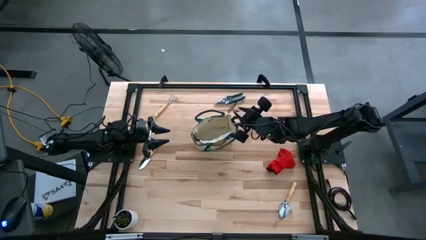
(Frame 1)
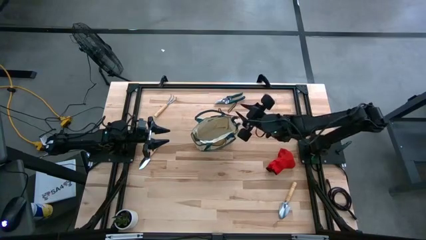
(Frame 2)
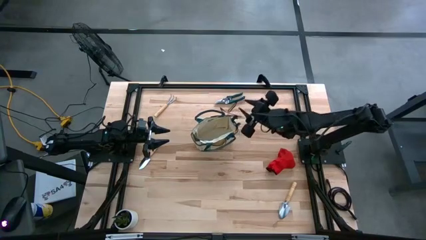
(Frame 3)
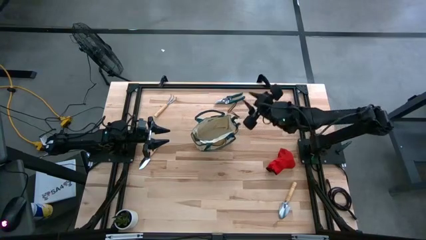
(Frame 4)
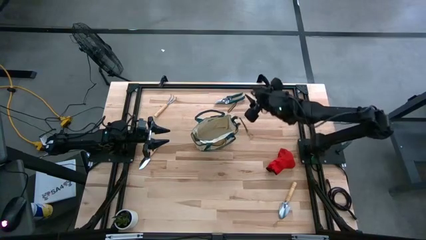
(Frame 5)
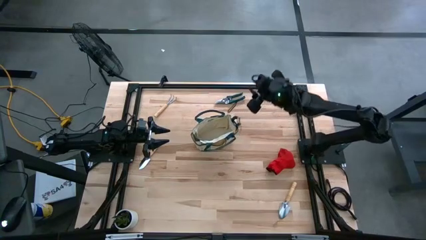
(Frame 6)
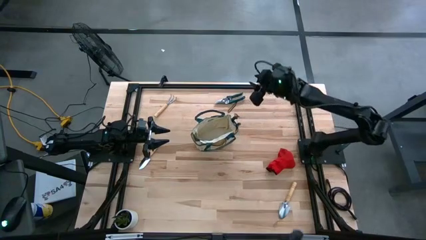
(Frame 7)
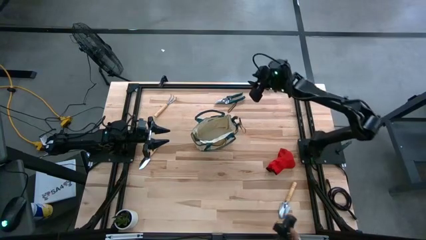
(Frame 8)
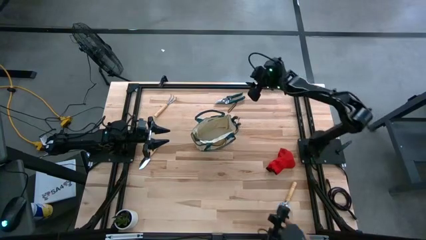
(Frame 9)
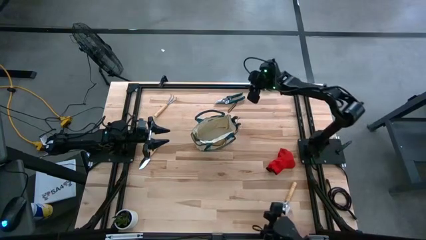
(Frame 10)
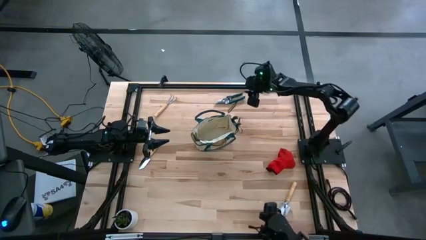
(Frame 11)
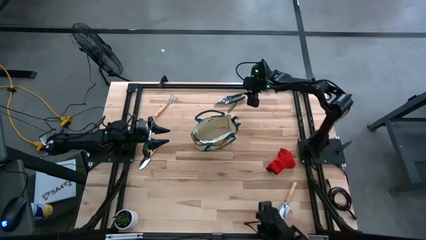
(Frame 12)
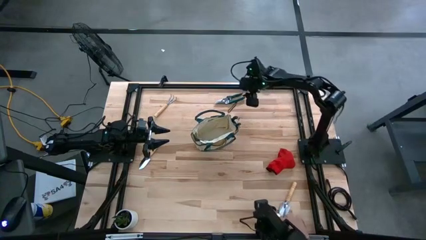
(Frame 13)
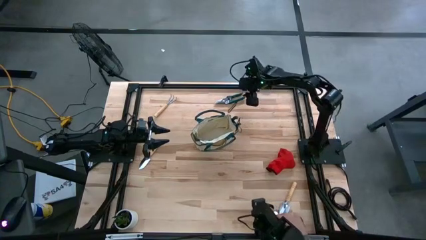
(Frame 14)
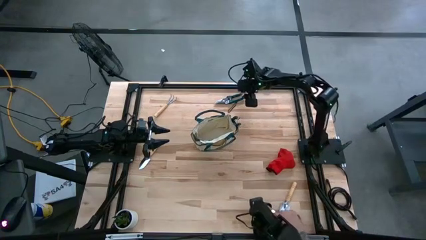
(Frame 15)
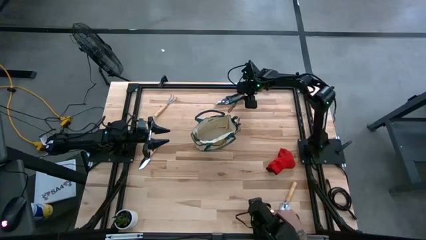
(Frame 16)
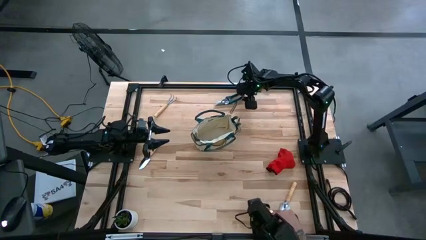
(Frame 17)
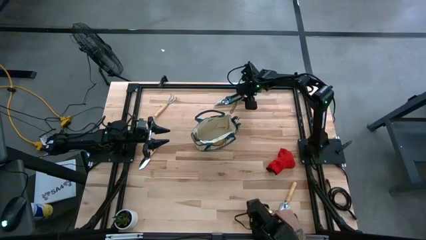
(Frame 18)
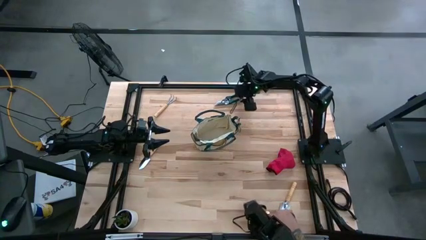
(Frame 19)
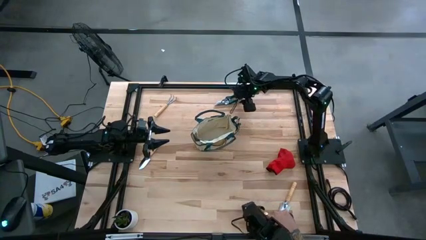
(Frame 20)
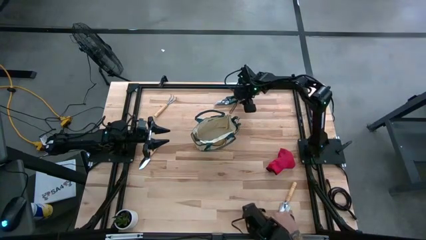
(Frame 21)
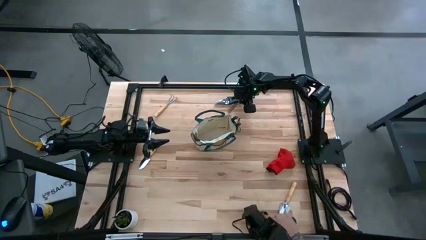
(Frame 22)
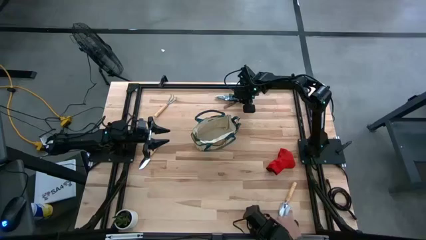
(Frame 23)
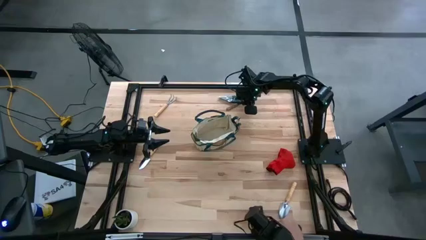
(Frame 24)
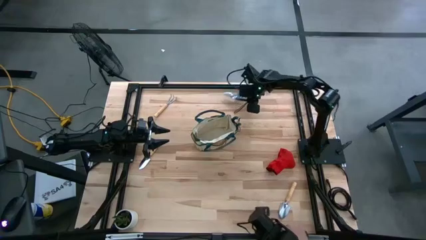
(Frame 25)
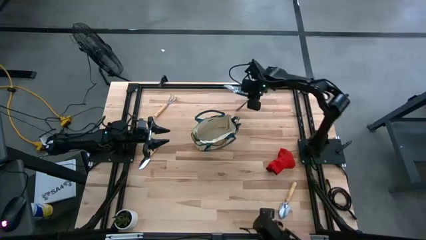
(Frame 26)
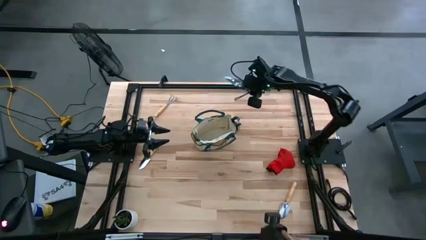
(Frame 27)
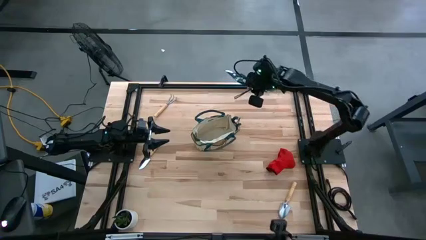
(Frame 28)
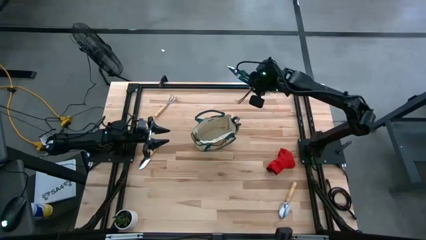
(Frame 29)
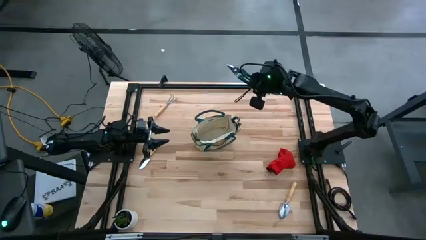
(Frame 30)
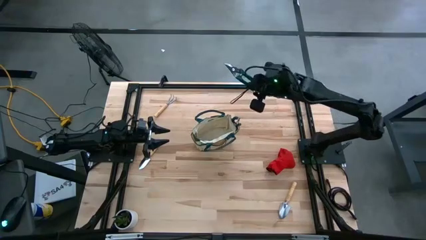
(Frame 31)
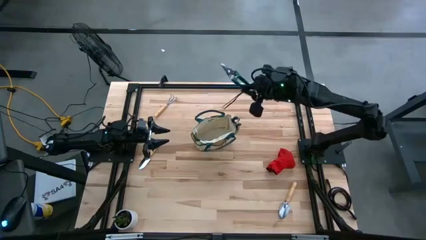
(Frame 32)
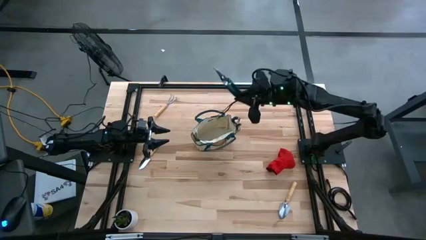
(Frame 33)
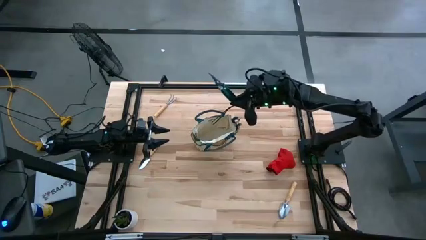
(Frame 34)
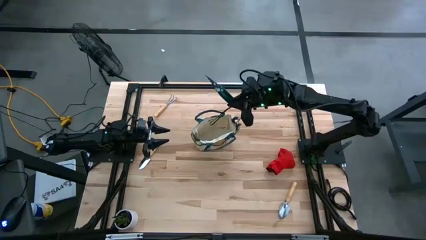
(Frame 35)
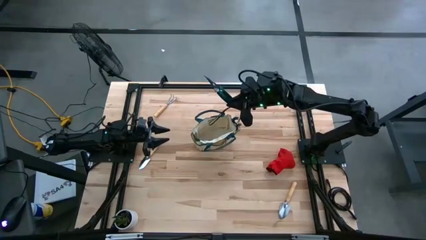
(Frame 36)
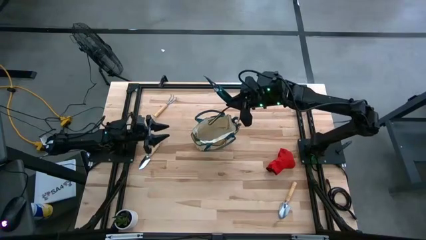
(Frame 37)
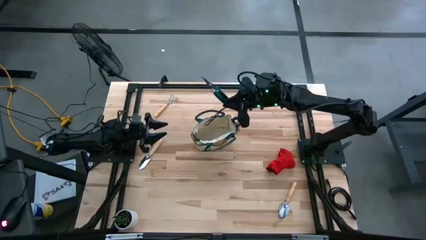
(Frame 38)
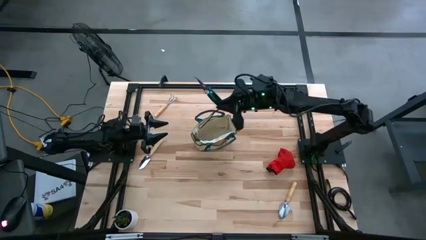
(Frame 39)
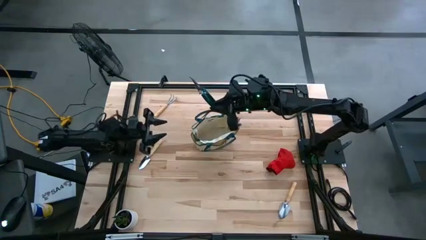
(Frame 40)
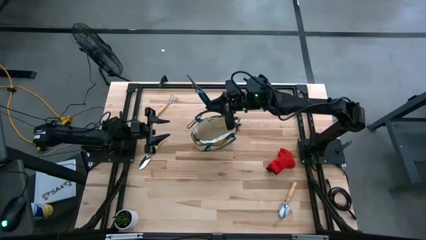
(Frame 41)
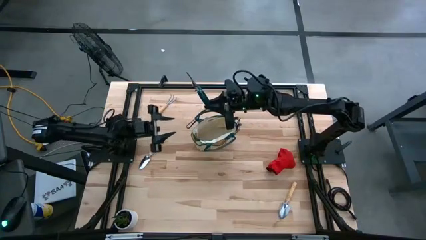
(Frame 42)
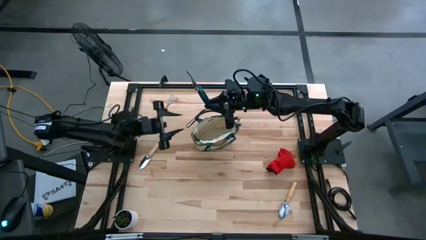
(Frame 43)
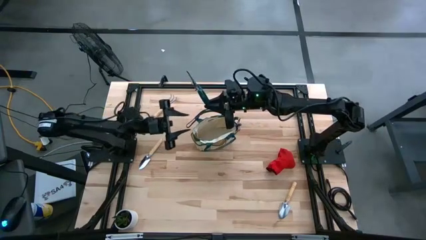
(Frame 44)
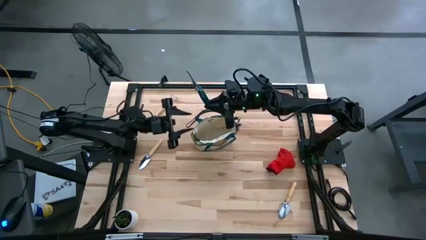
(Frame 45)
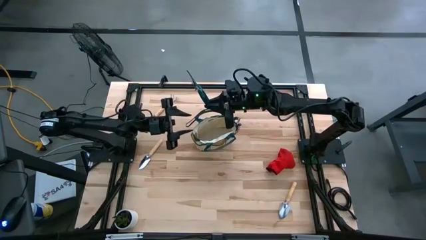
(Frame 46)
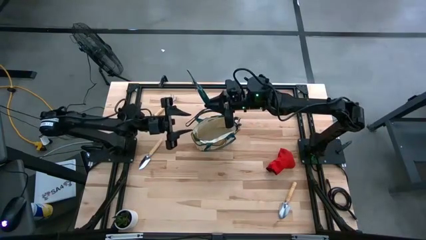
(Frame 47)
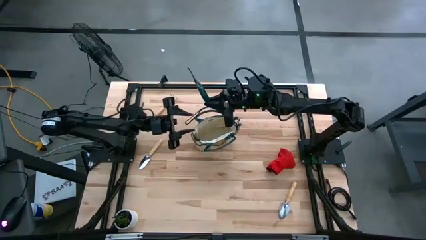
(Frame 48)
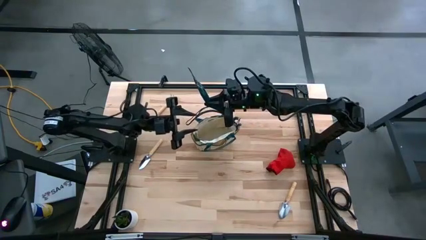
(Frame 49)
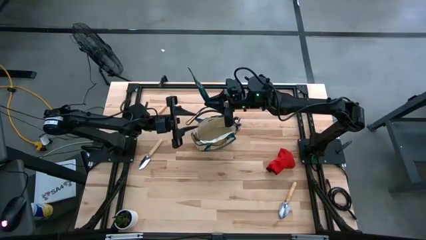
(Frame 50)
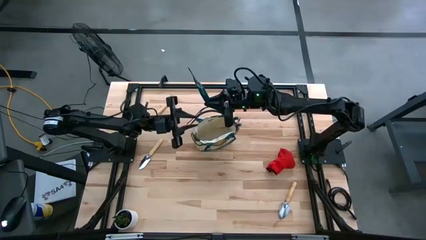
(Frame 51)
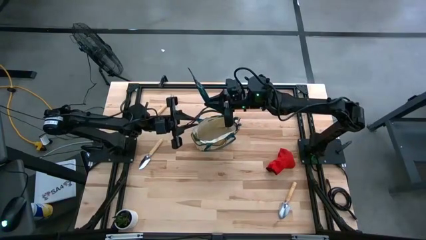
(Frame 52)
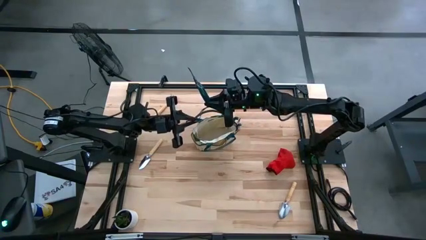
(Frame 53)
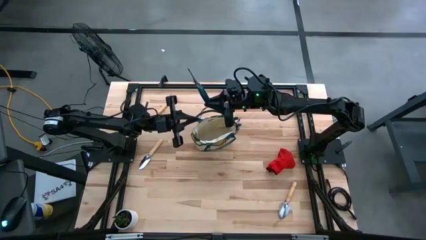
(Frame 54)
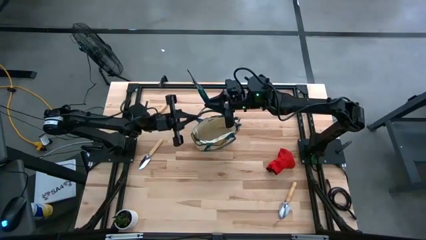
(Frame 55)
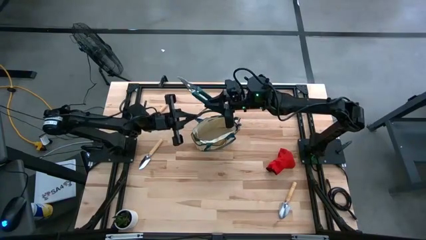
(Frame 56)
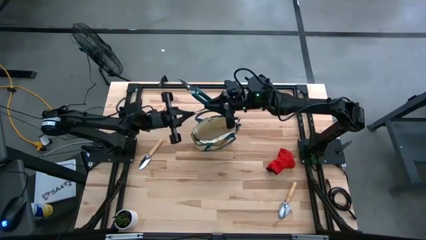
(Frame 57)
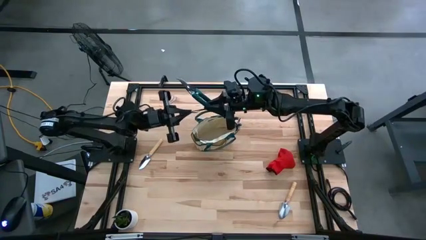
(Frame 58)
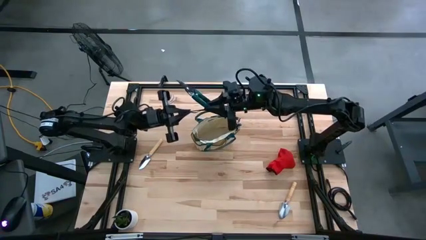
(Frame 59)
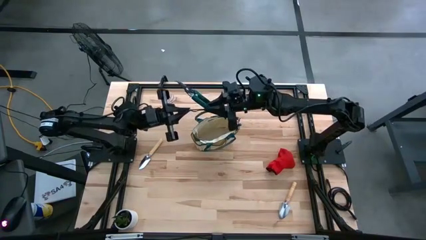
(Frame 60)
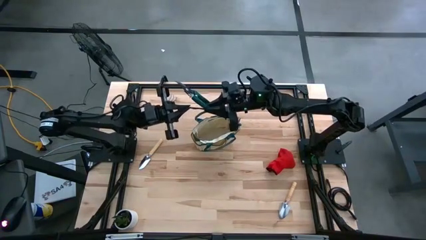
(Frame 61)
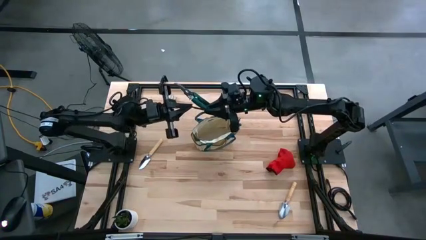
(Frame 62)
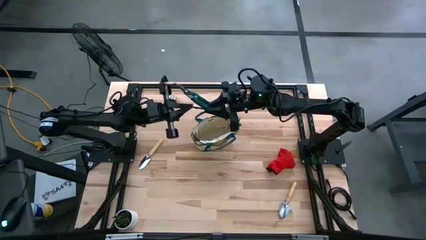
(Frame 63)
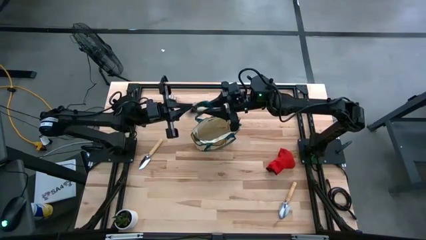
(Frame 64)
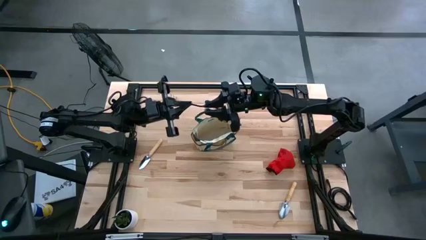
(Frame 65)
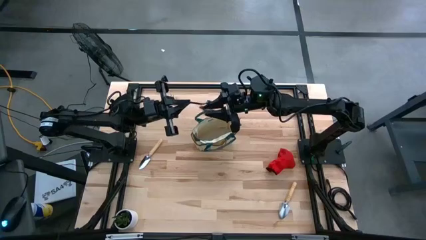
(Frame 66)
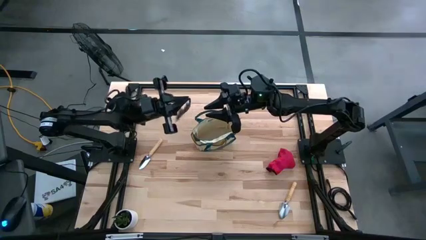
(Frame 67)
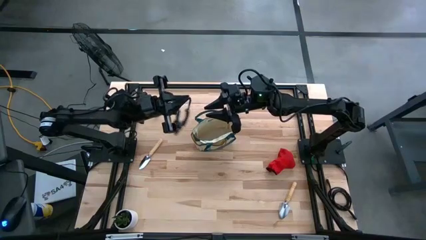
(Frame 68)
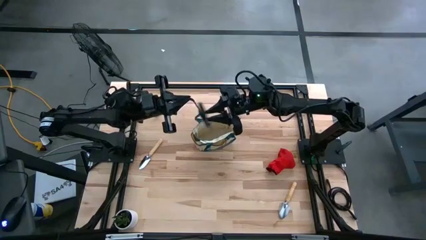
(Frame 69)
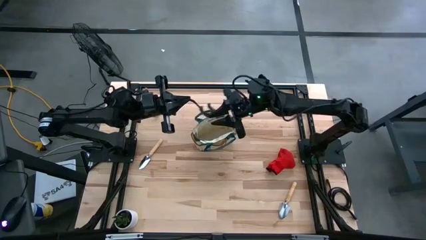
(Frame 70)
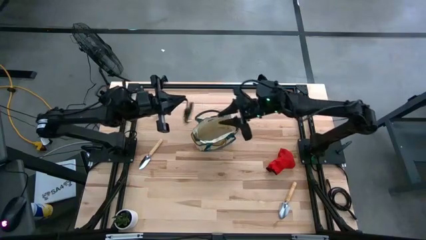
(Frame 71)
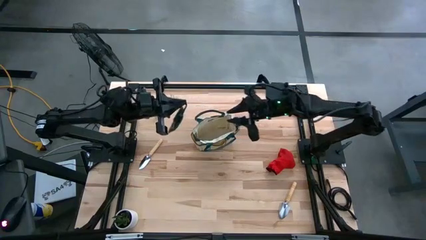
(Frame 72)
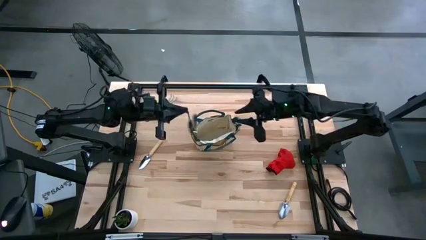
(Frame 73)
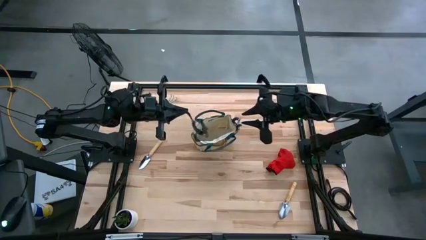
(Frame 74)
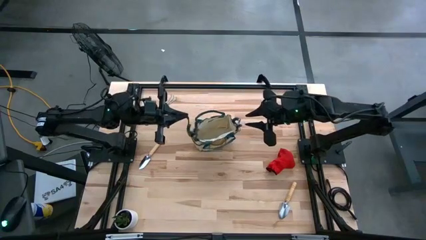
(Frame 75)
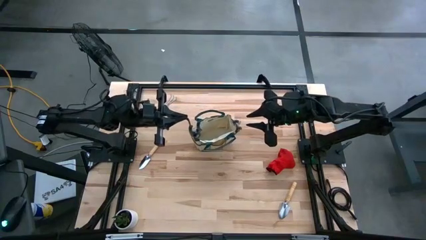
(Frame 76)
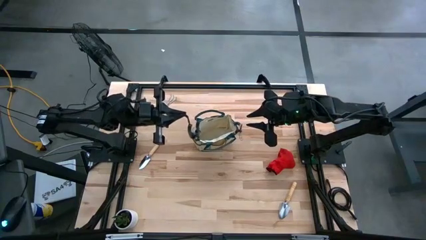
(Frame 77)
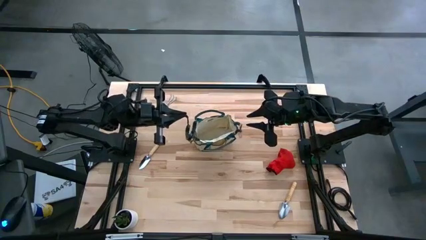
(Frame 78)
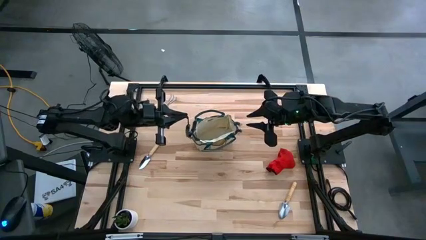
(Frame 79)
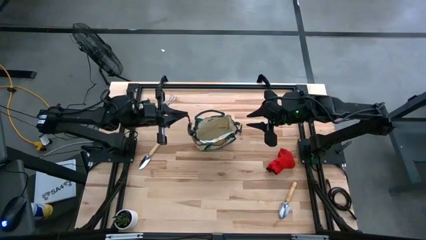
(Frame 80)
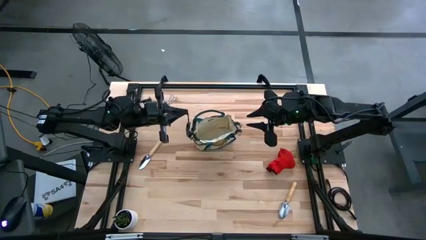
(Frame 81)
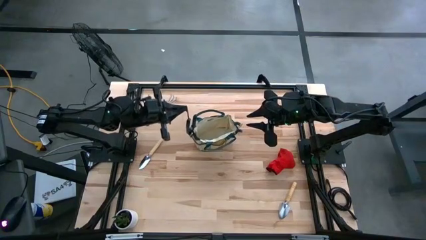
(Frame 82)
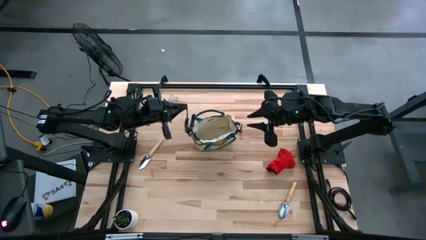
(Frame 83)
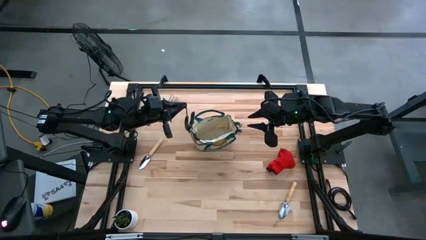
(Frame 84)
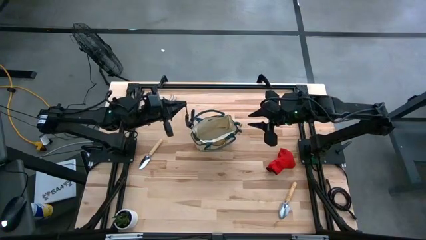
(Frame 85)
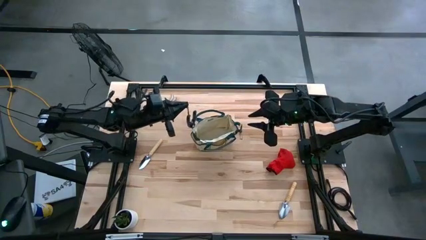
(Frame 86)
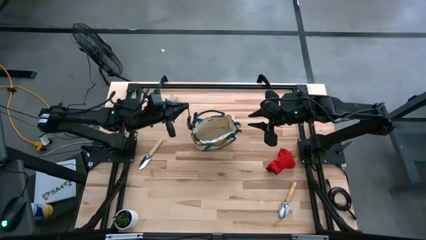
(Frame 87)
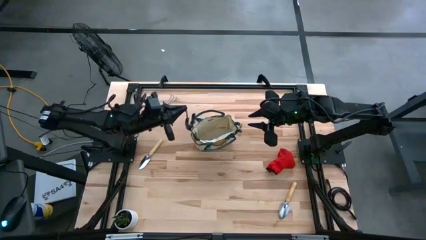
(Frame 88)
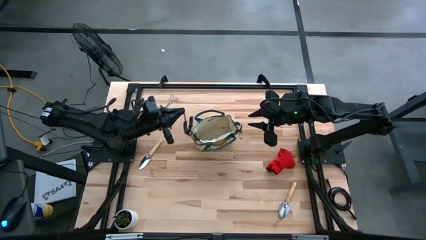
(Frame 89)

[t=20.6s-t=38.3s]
Task: Pick & Place Garden tools in Gardening bag
Put the shear scissors into the gardening bag
